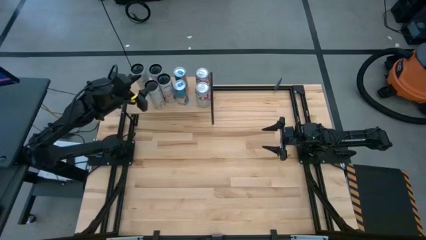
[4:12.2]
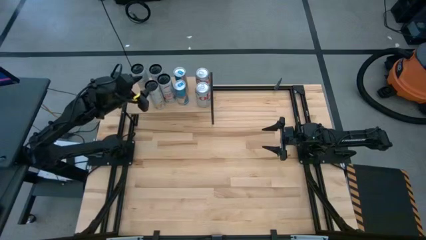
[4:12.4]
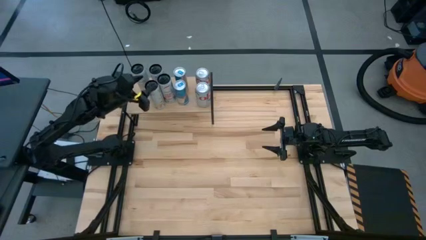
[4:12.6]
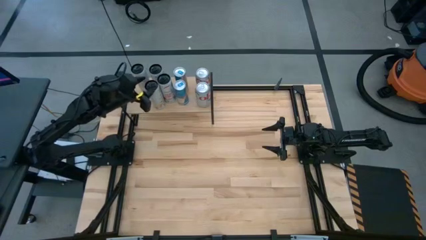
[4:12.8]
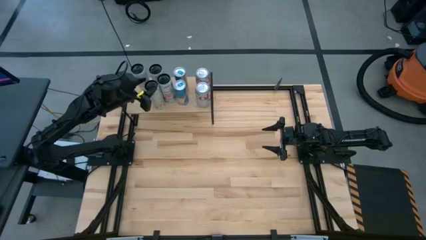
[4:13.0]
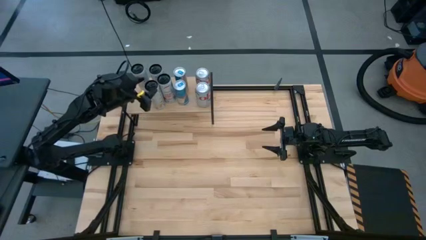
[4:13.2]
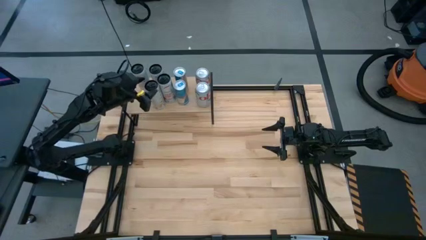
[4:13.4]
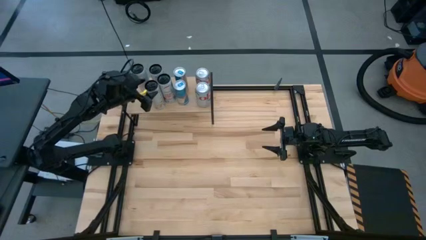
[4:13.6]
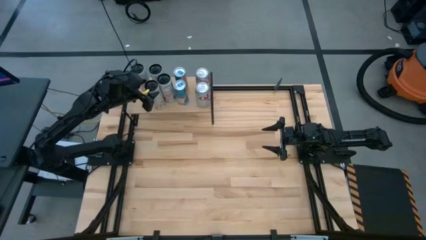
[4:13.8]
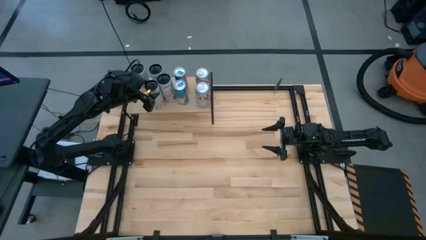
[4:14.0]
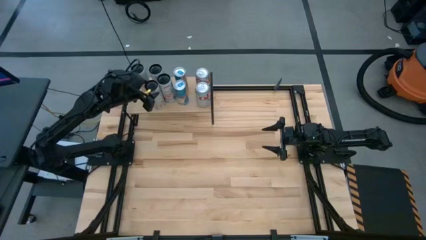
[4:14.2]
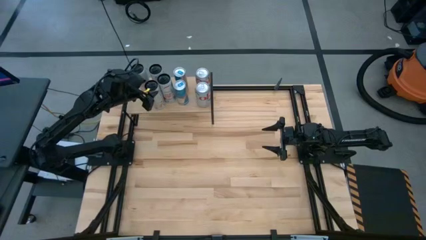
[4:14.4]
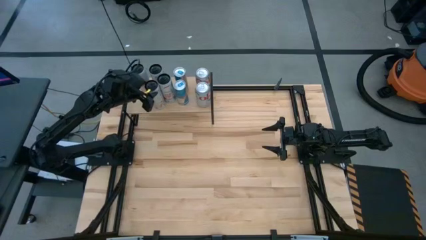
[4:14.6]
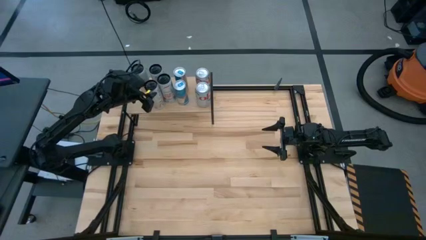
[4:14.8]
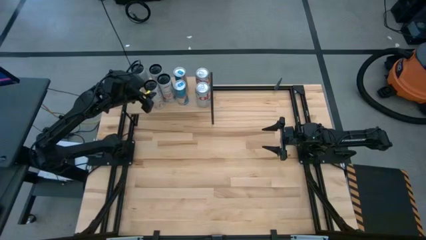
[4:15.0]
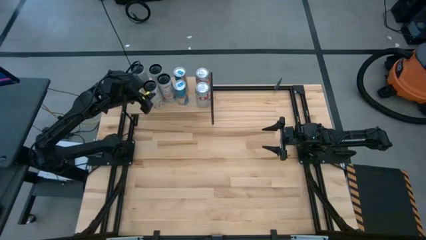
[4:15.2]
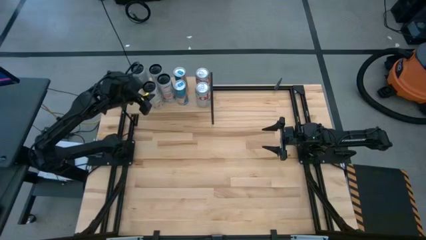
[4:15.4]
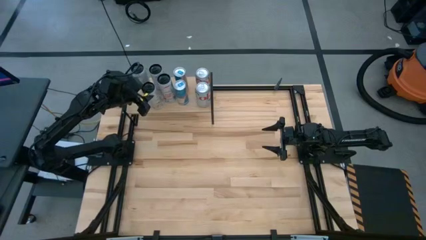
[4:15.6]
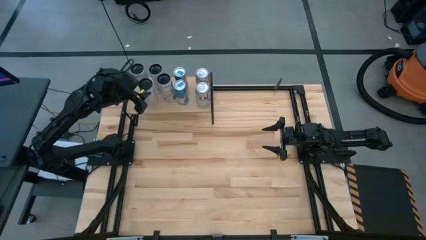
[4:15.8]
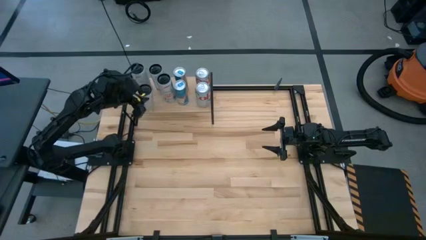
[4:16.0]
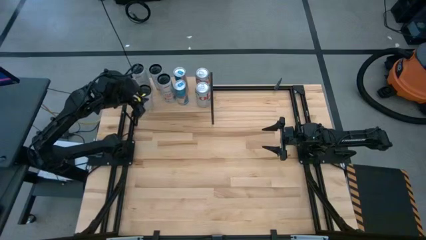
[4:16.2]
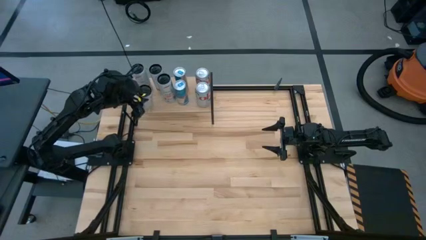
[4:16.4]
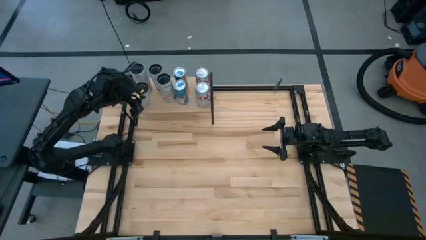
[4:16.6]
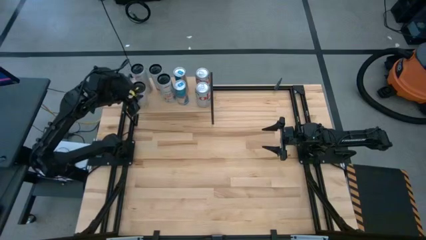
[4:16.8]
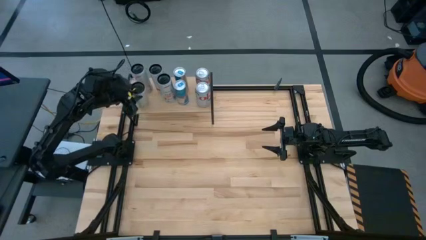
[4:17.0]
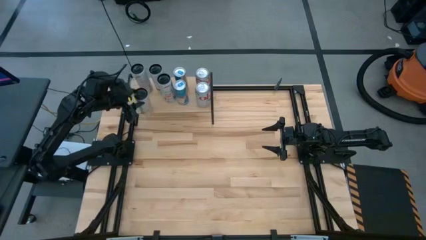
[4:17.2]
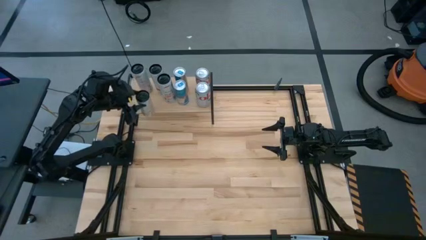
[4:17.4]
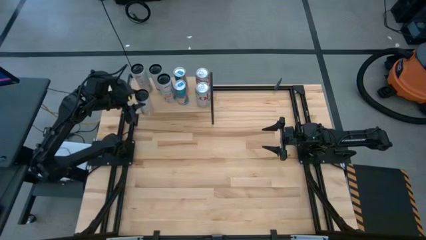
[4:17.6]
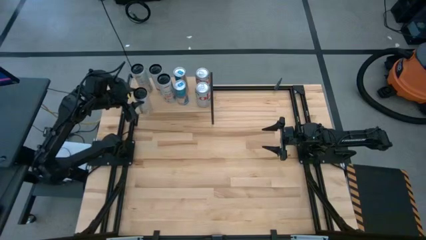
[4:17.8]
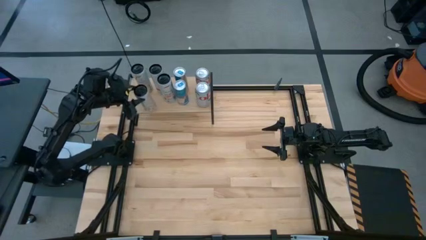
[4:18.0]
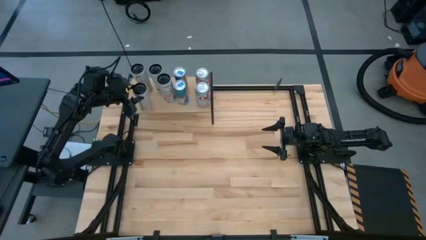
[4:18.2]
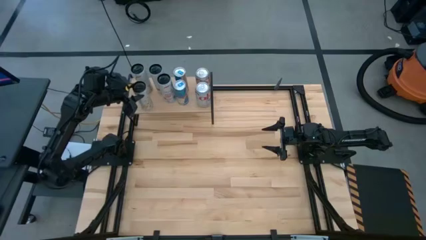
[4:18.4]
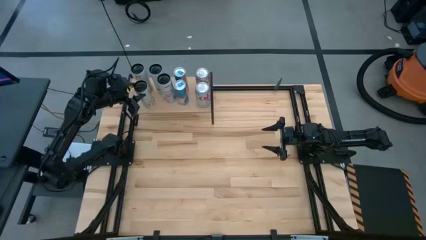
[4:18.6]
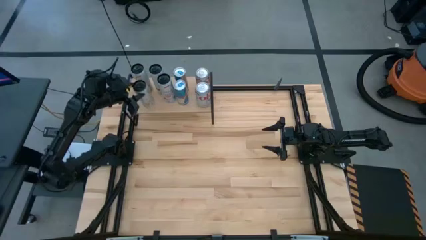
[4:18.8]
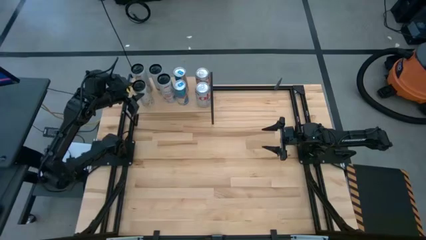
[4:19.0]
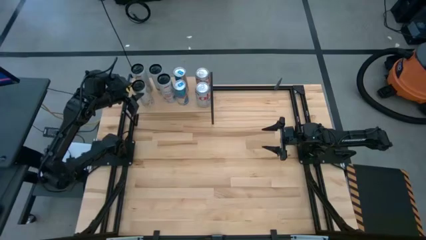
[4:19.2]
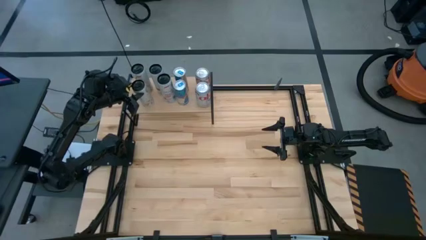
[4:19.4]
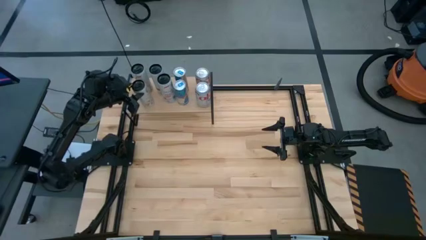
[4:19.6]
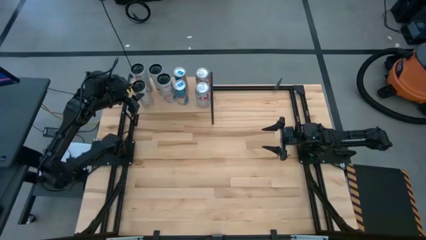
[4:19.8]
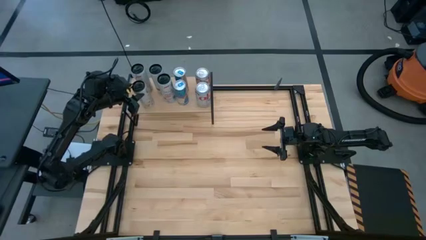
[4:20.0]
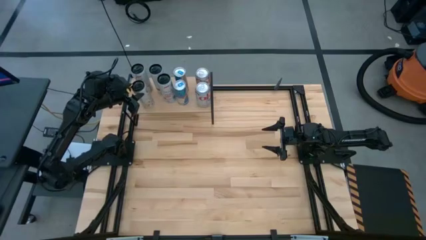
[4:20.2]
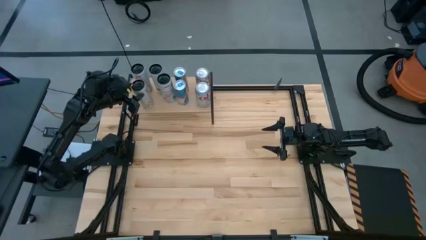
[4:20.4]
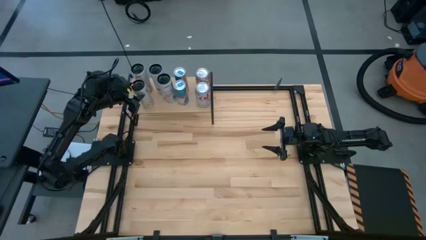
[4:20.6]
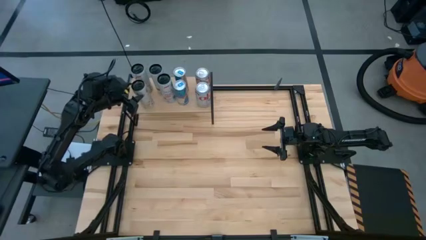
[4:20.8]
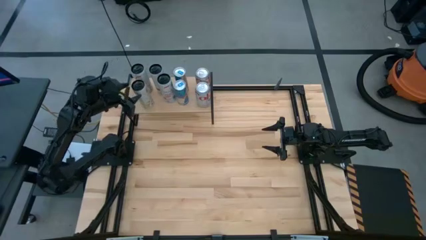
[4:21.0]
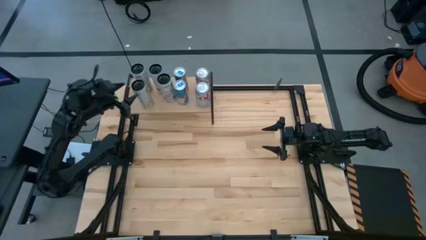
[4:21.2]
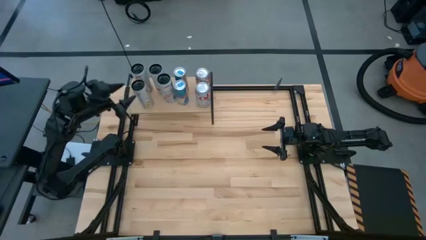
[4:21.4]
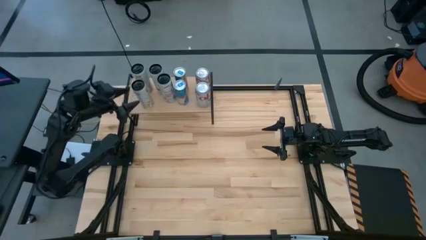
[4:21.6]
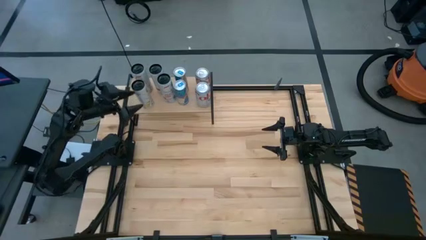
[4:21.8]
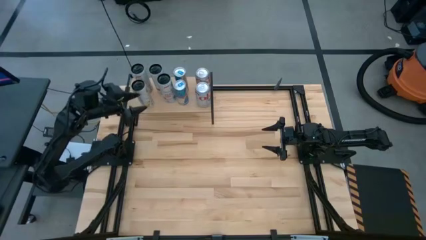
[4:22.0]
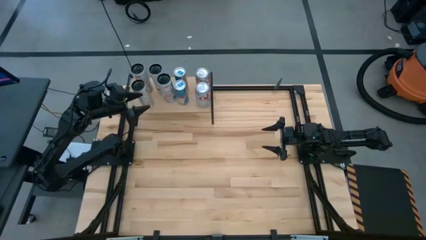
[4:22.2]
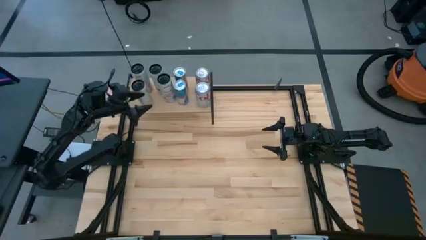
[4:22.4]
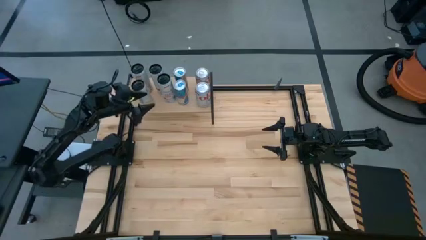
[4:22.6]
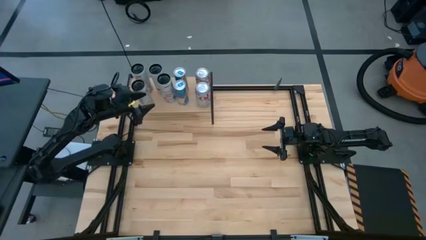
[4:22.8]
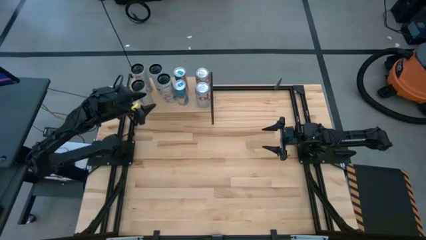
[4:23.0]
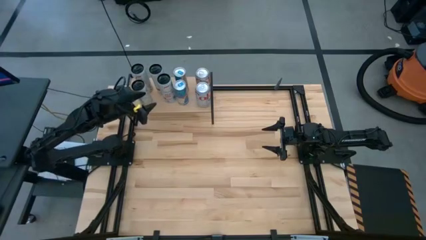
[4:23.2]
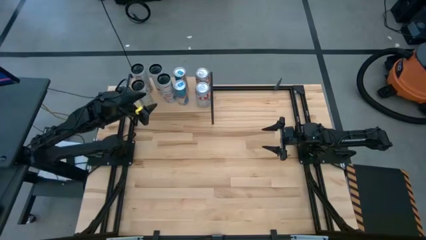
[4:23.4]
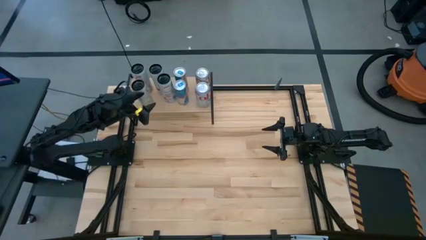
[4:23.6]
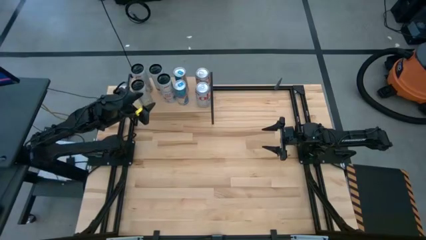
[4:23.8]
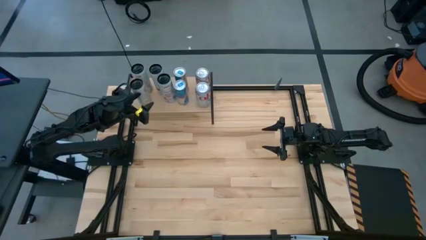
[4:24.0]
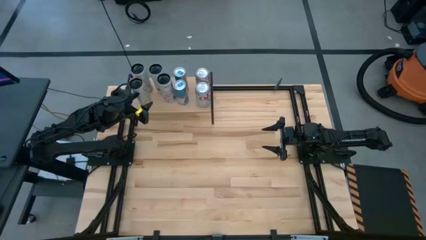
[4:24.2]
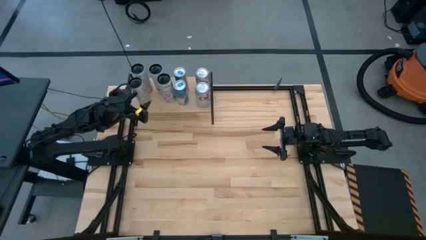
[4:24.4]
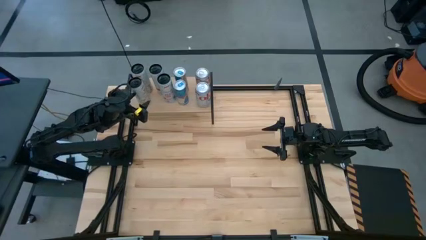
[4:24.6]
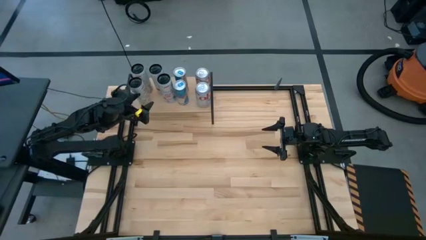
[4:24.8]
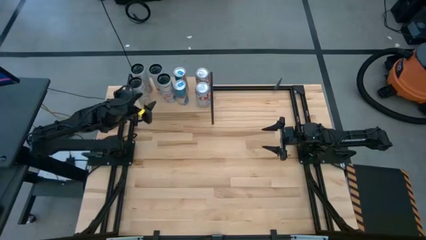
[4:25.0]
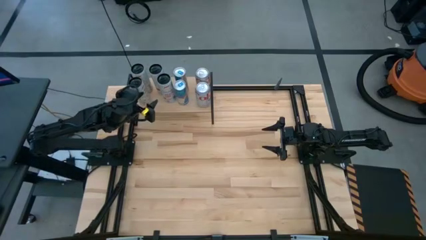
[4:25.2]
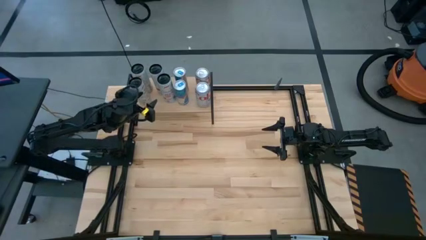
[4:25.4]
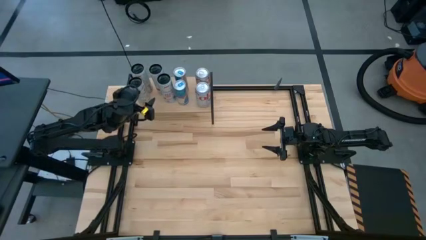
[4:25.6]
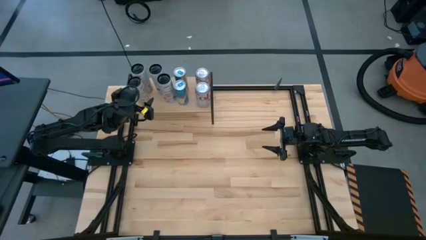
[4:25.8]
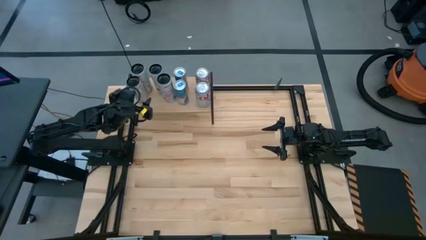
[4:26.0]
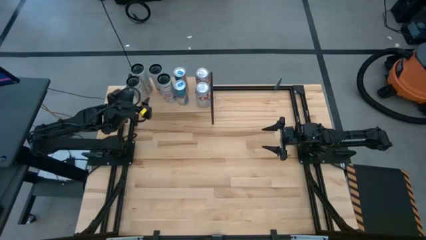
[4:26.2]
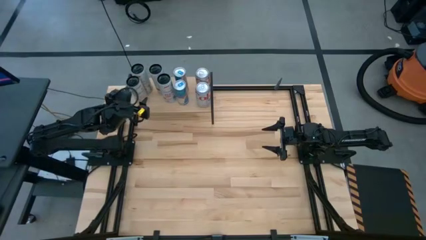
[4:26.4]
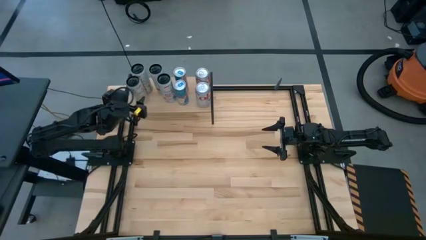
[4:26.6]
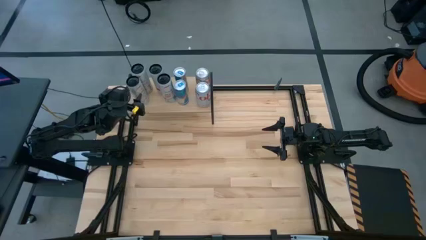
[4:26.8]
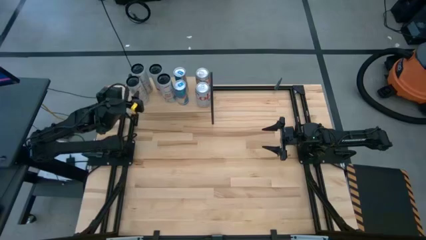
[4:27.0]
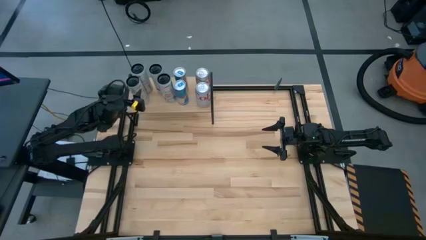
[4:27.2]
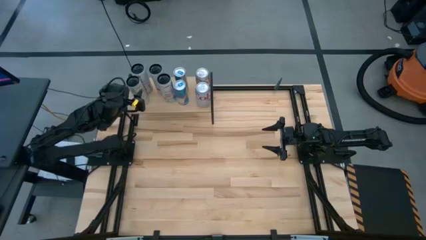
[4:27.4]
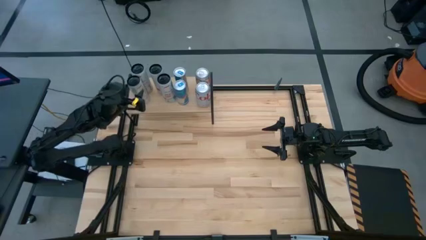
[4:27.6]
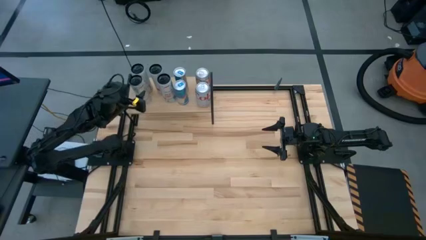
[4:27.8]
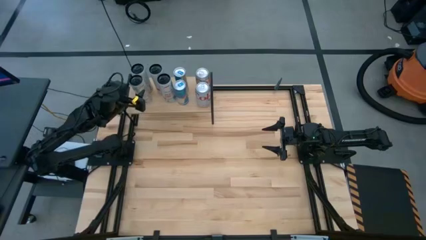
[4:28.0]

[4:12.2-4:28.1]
Task: Place canned beverage on shelf
Put the white-yellow soda can on the shelf aligned with the other white-yellow soda can
